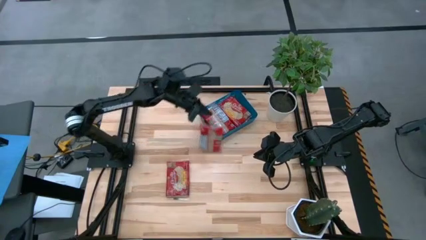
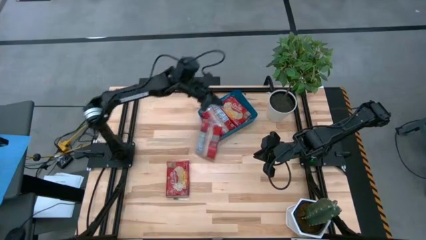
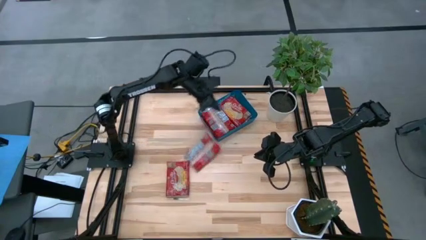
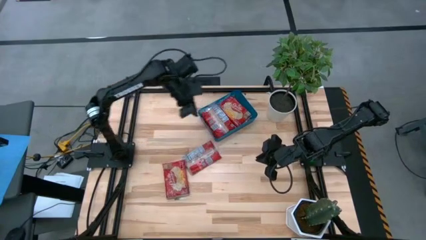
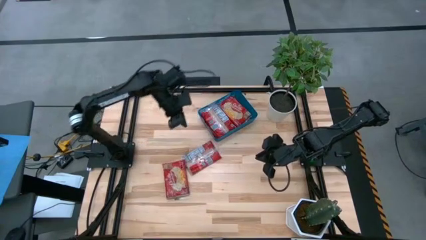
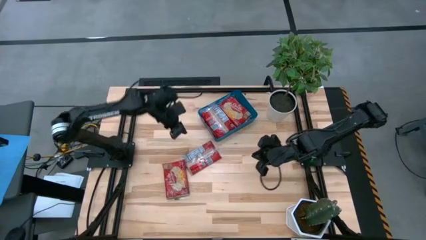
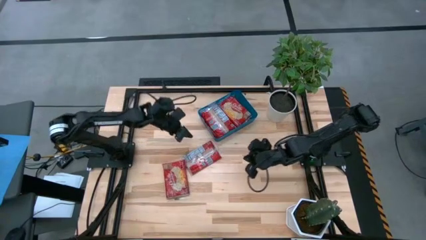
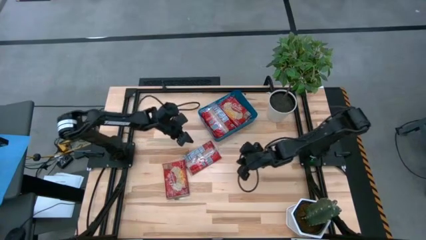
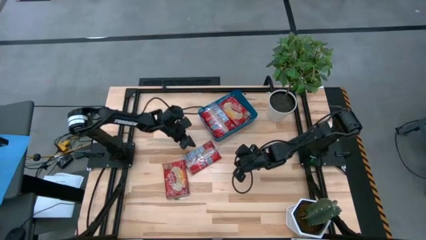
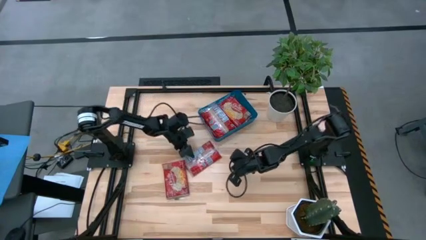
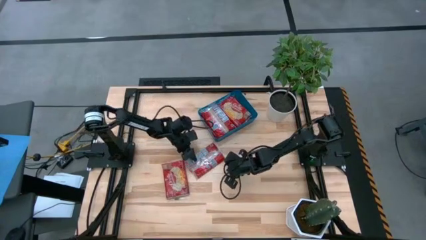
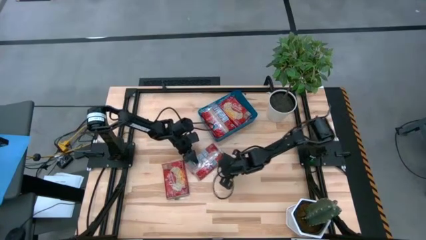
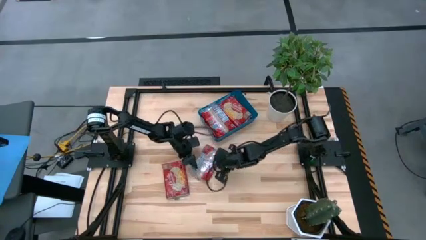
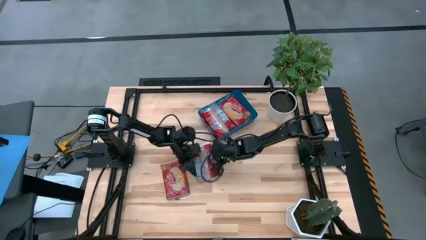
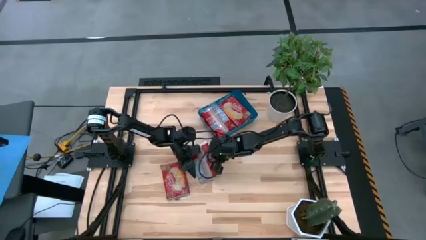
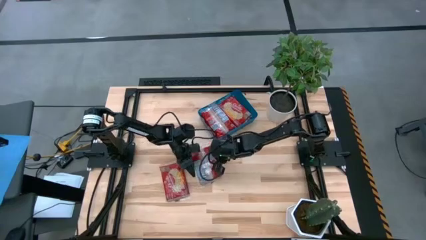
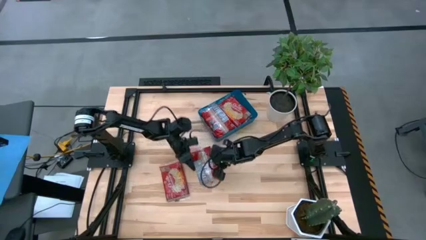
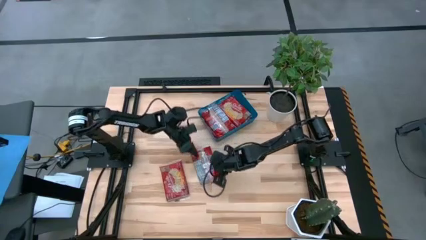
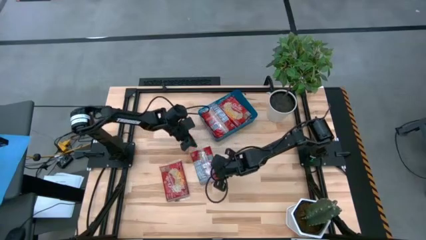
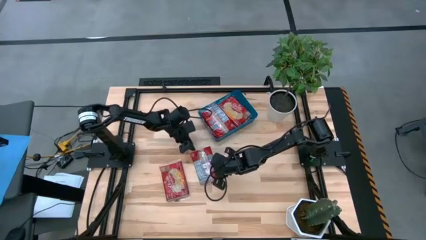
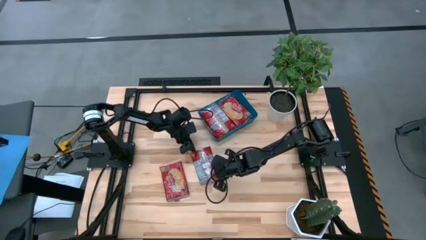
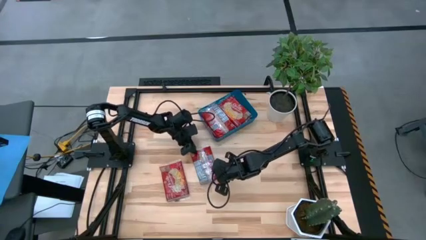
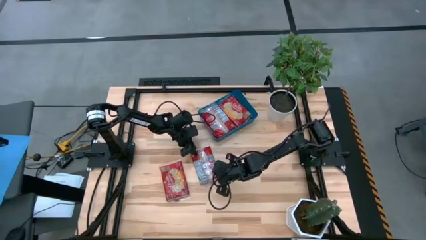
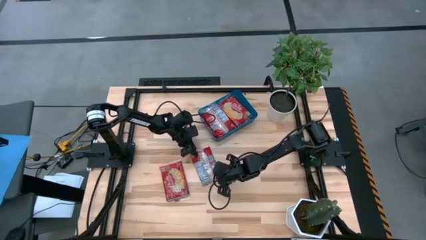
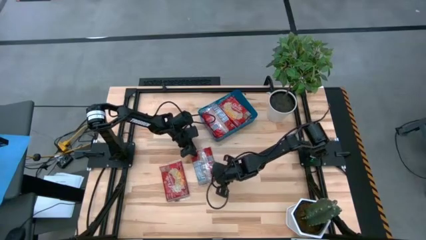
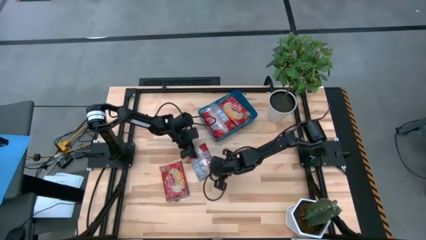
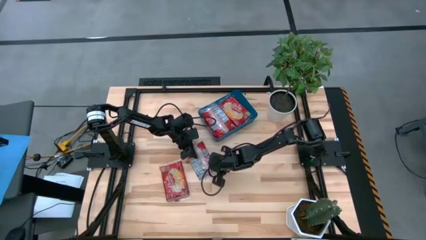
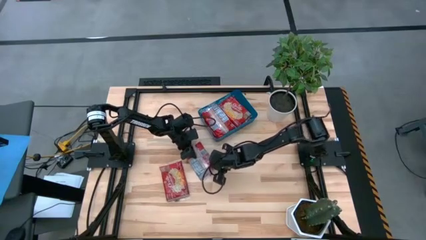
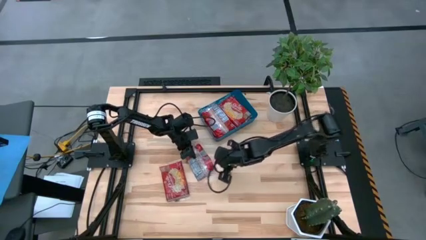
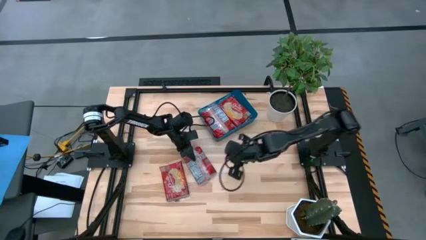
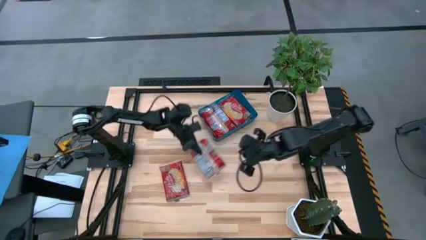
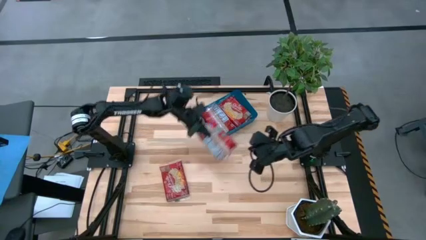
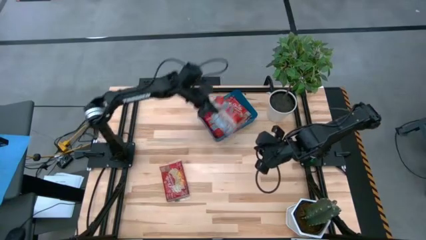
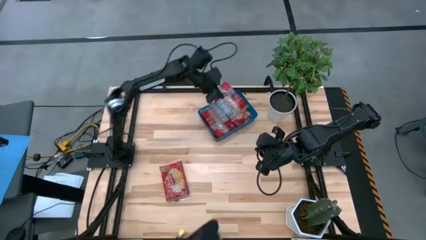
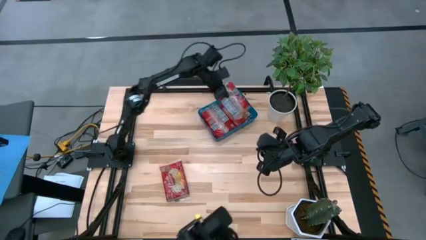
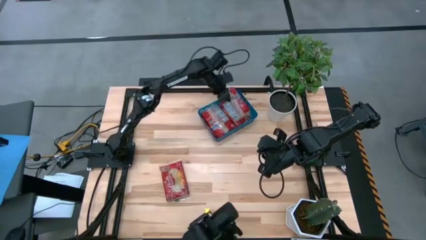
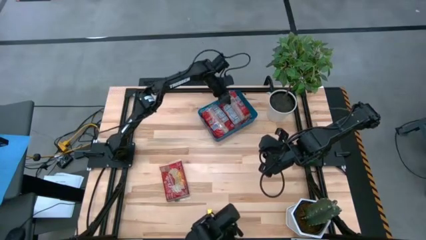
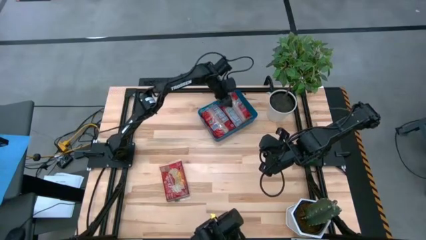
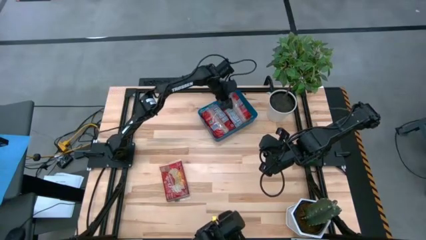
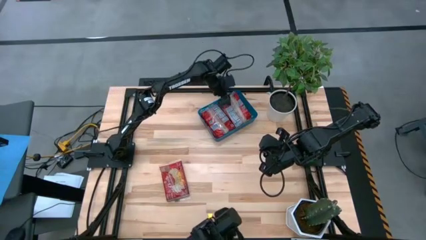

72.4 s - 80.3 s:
Task: Sort popcorn bags into baskets
Put the red popcorn bag into the blue bin

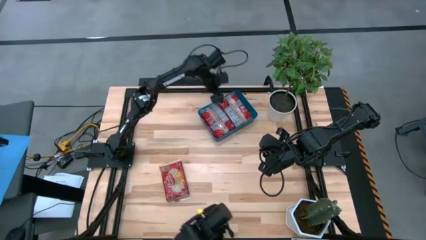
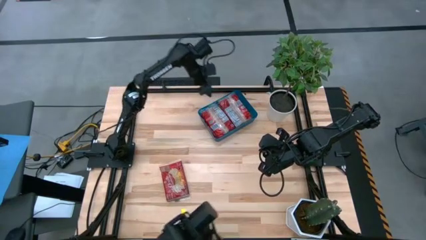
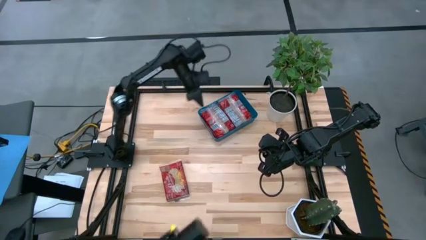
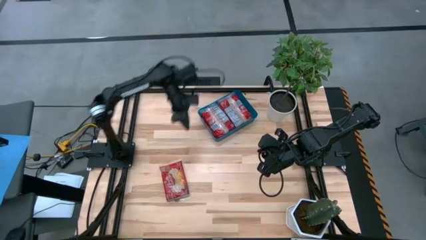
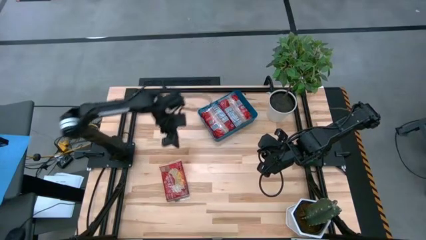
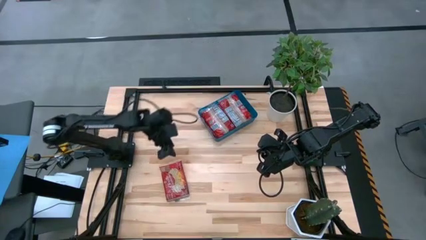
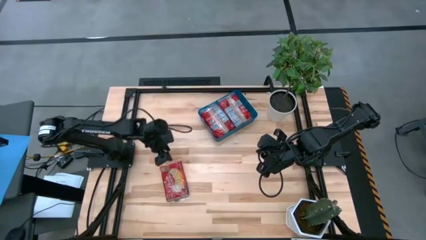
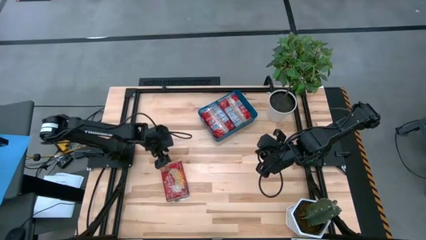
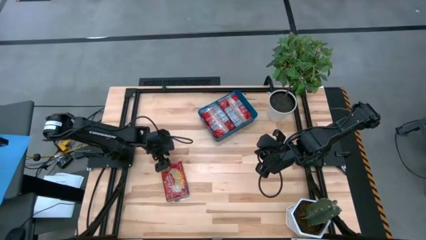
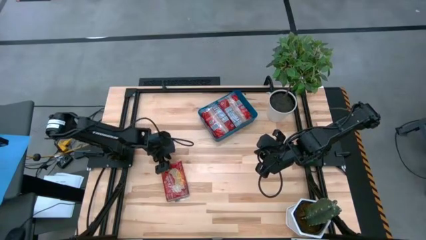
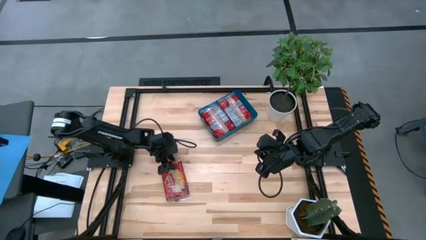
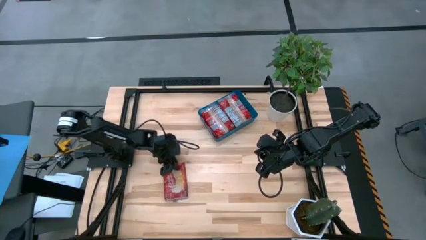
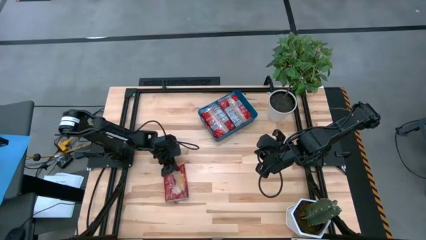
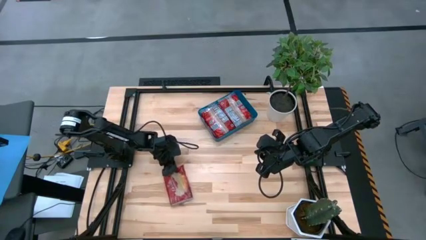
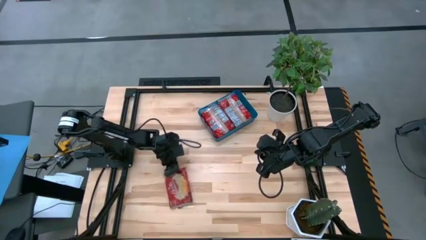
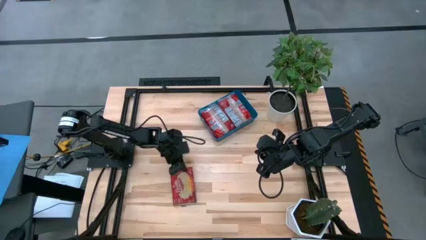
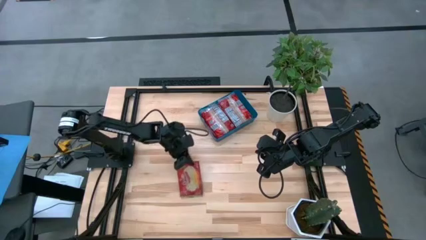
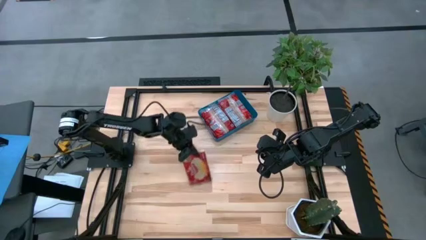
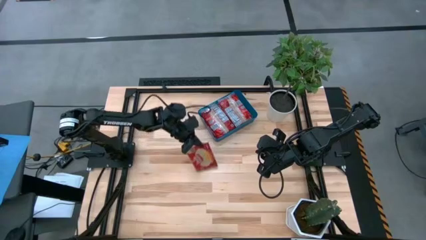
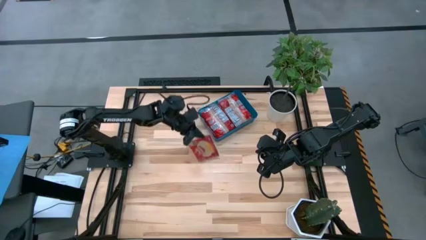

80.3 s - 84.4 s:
Put the red popcorn bag into the blue bin

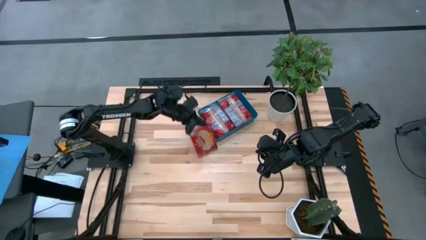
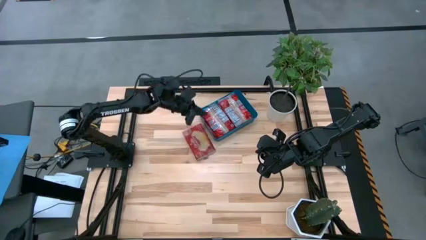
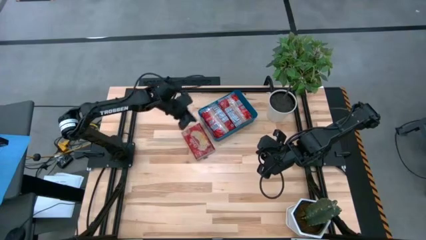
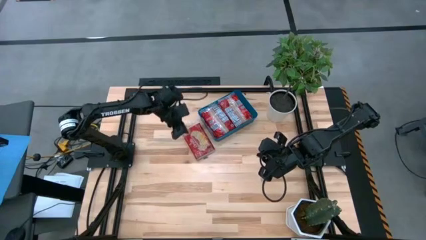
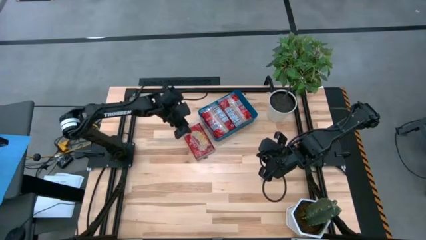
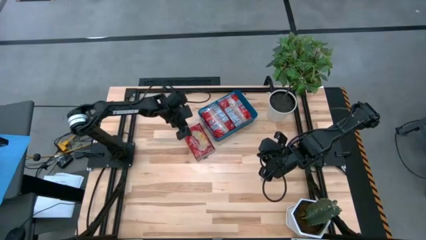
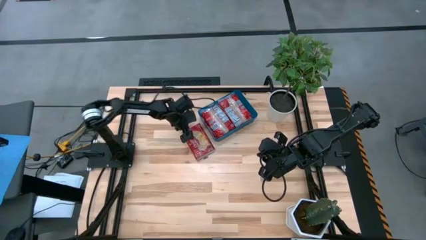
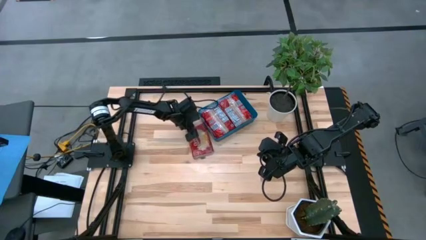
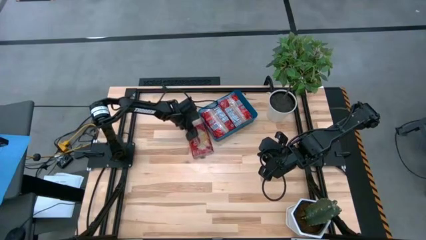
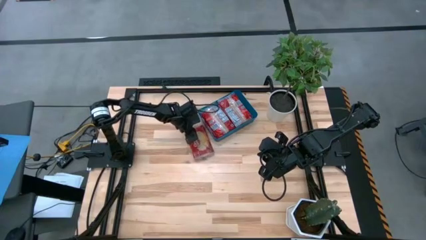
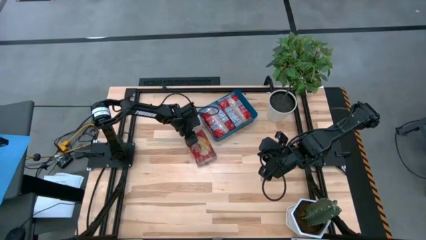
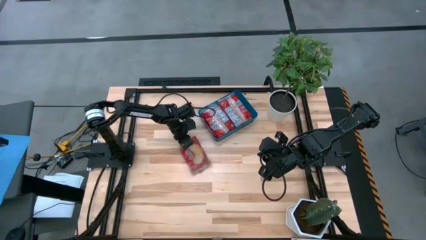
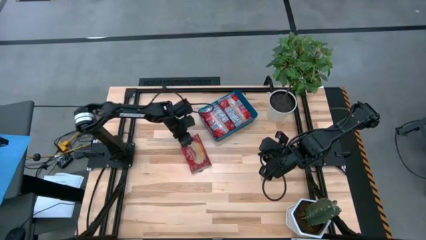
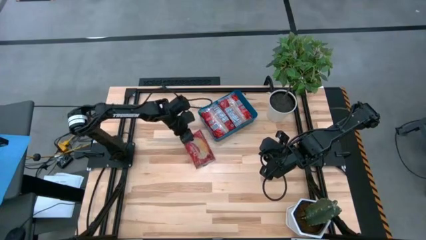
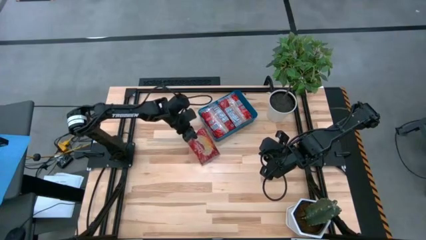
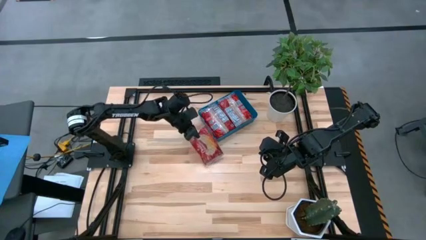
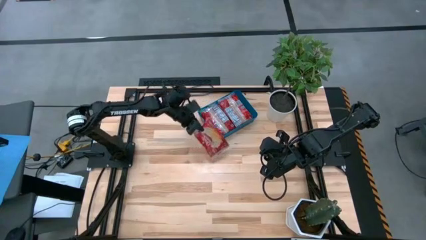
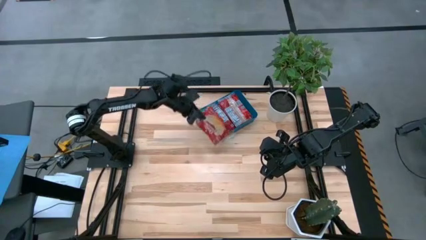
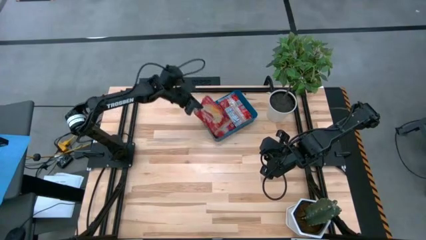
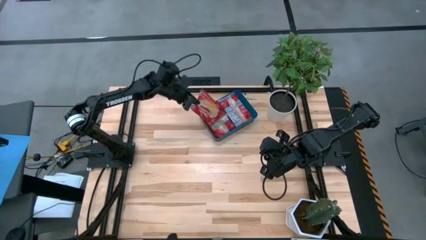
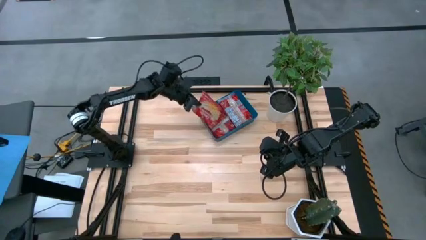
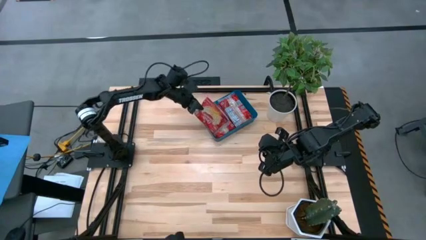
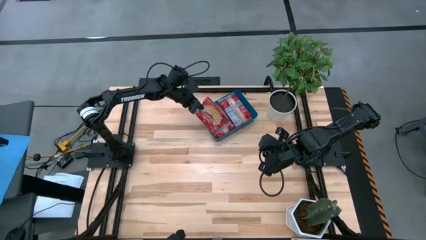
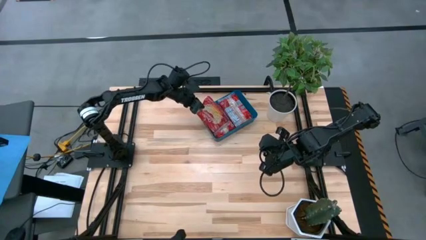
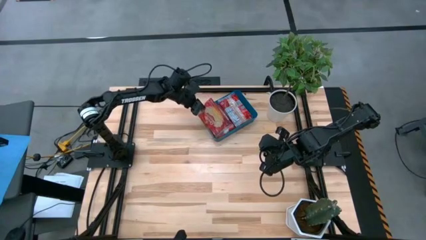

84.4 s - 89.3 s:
Put the red popcorn bag into the blue bin
